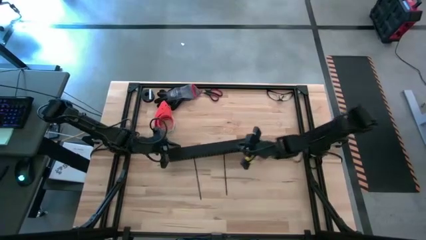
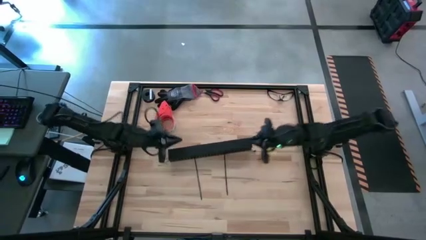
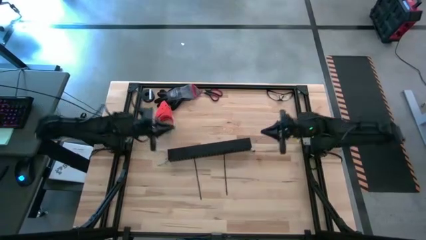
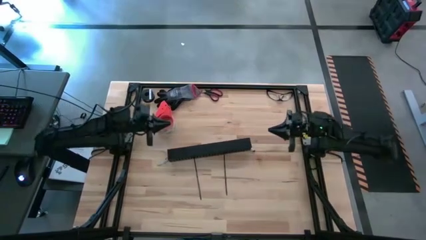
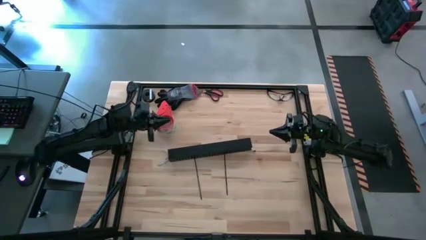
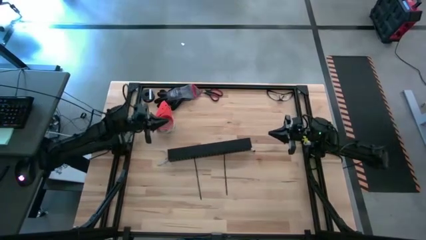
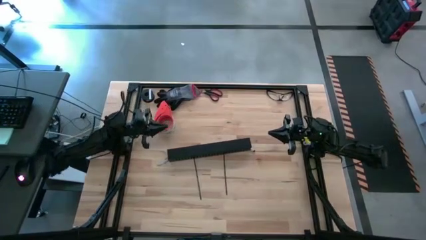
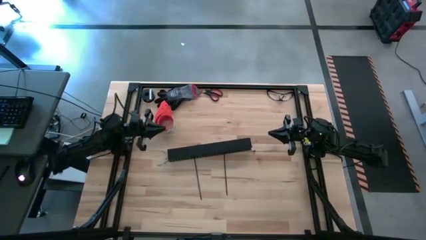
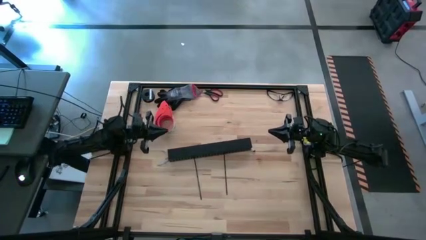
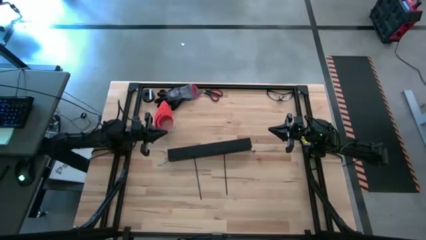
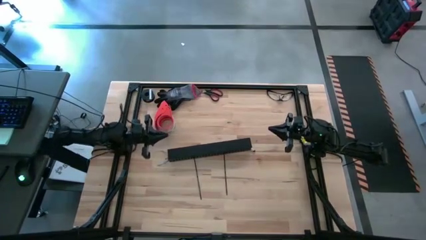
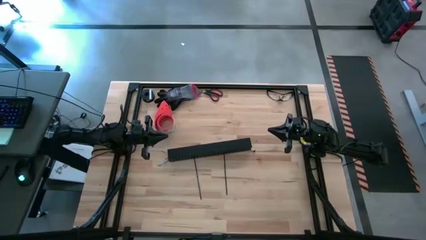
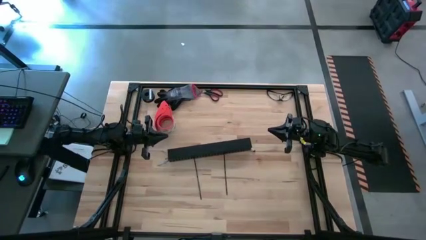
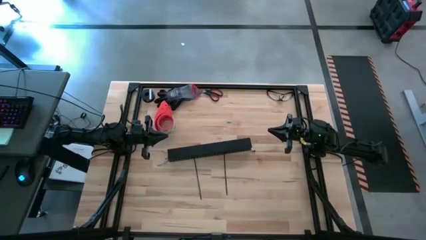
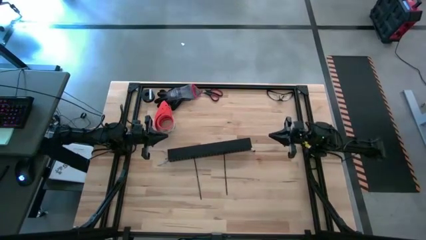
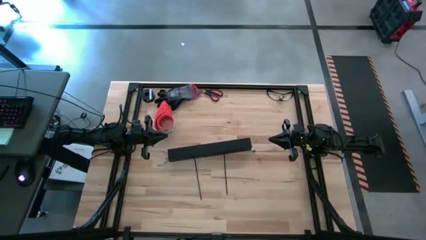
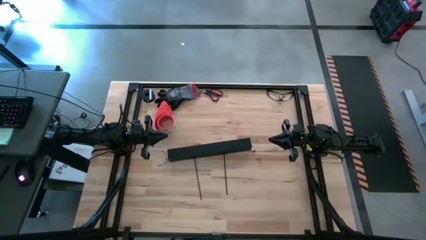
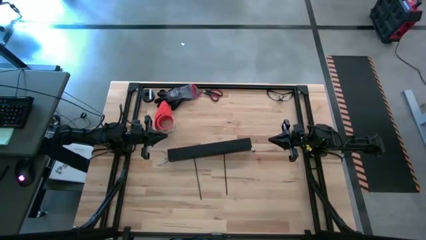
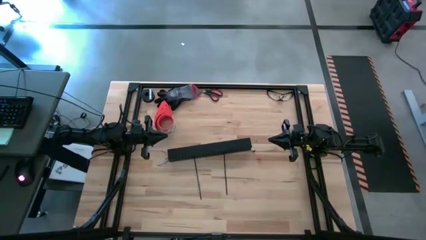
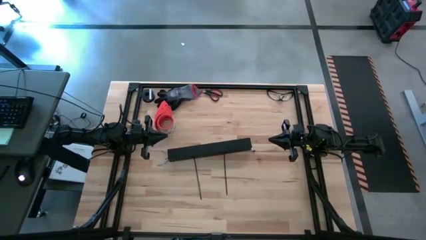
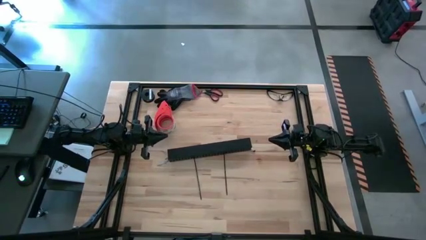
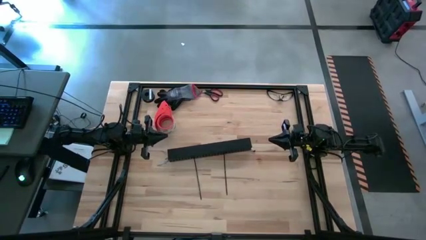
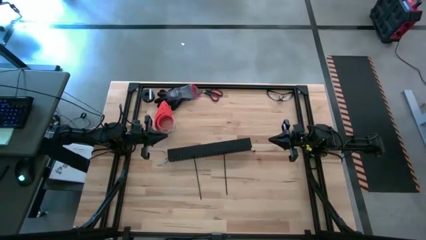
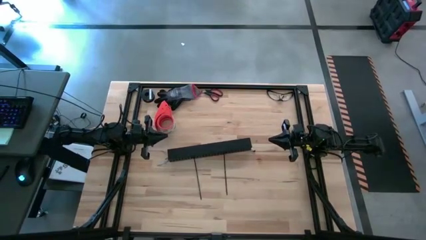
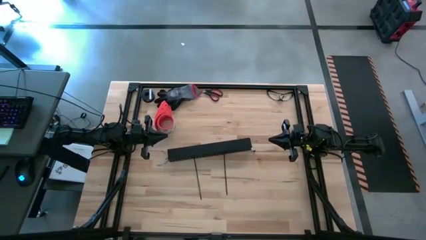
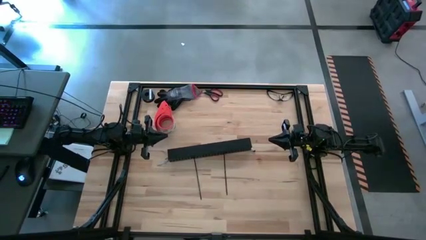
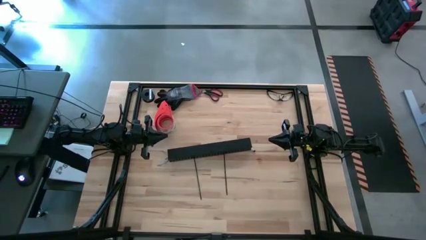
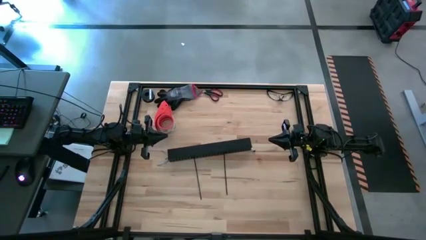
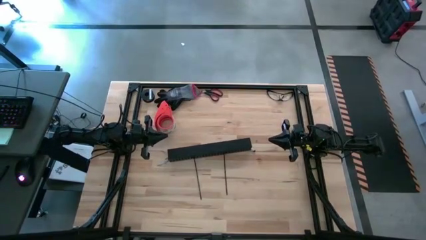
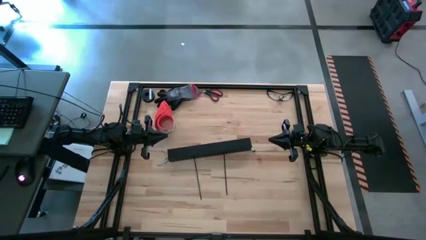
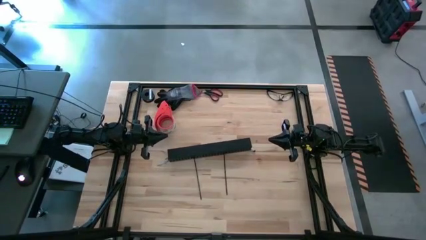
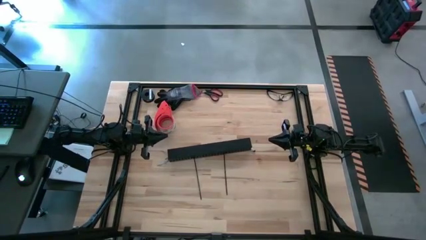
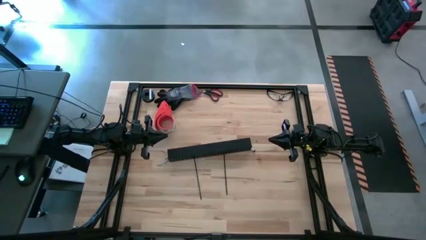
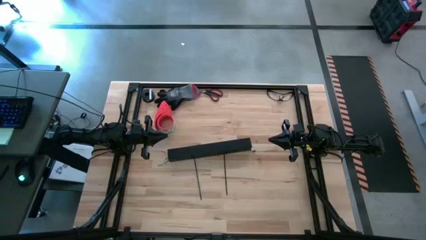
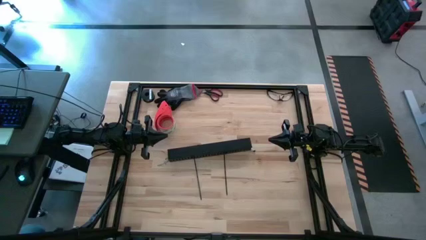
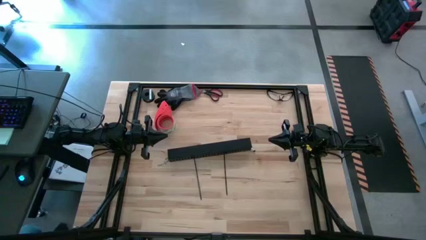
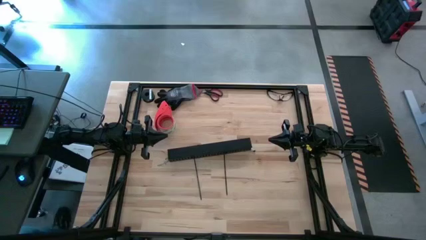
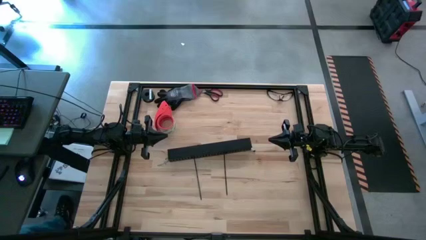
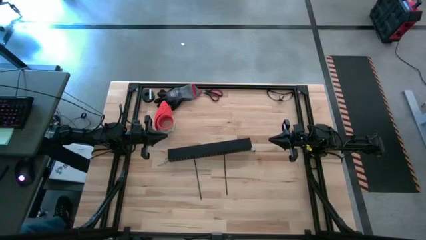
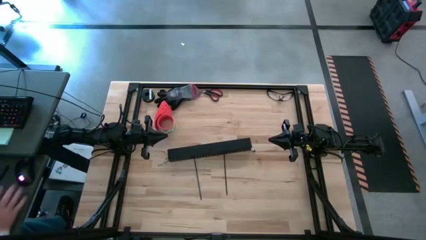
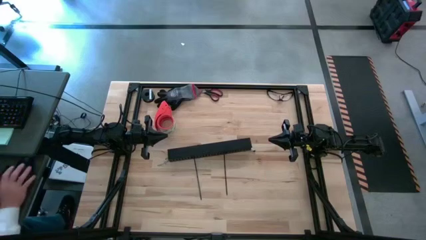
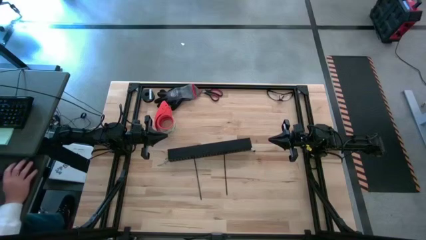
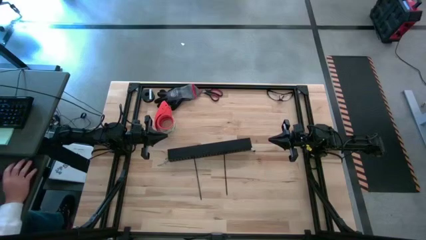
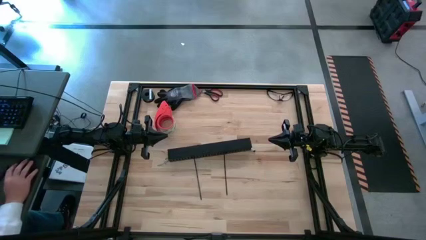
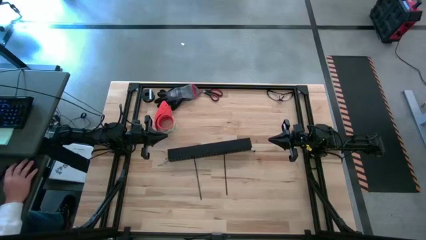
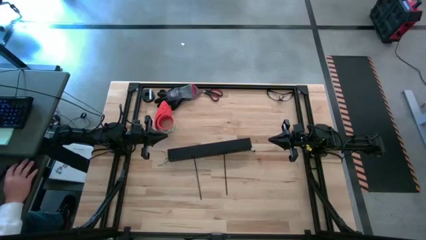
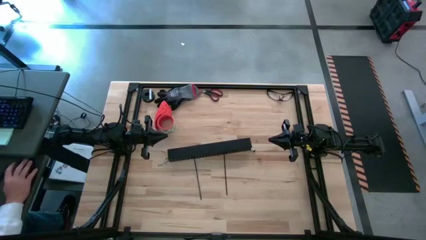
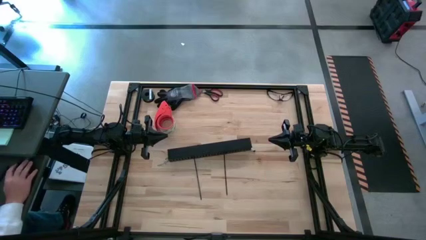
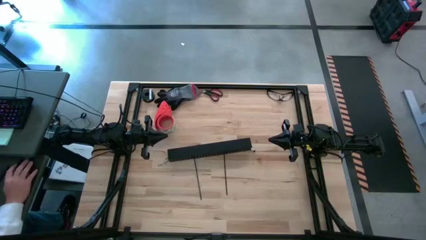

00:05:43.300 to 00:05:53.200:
Task: Ziptie cables
Return to Home Position
